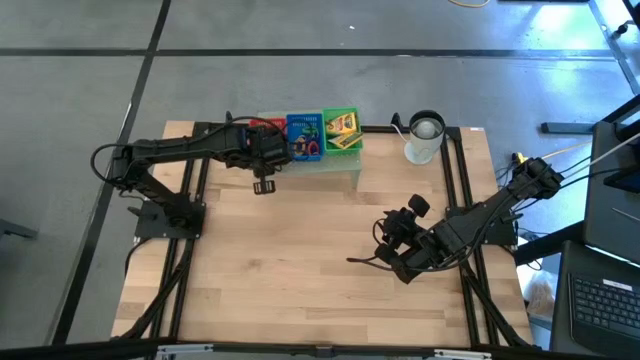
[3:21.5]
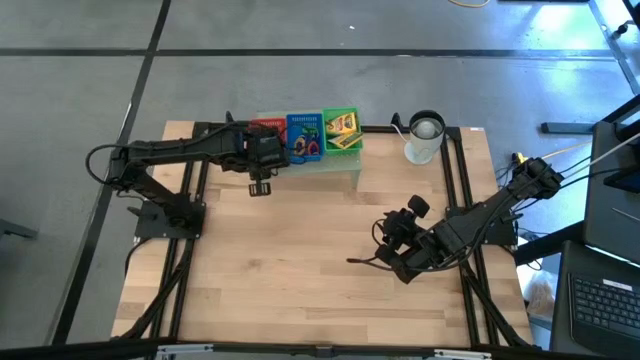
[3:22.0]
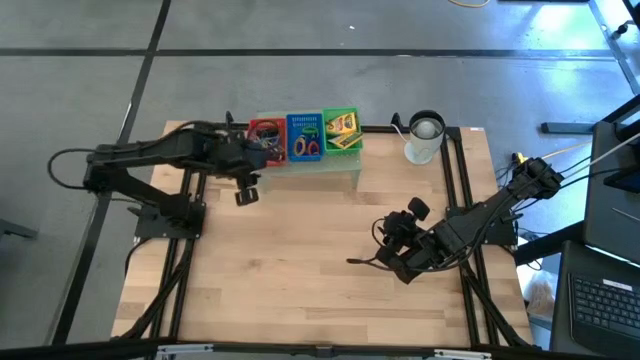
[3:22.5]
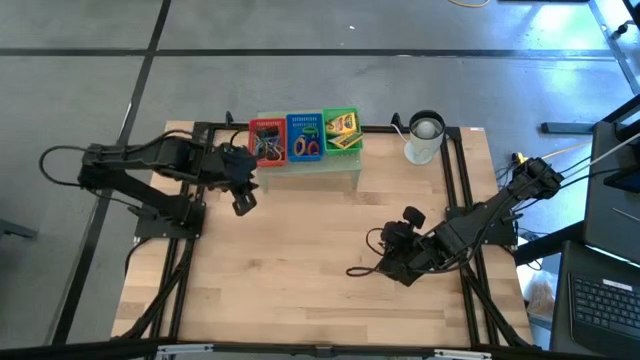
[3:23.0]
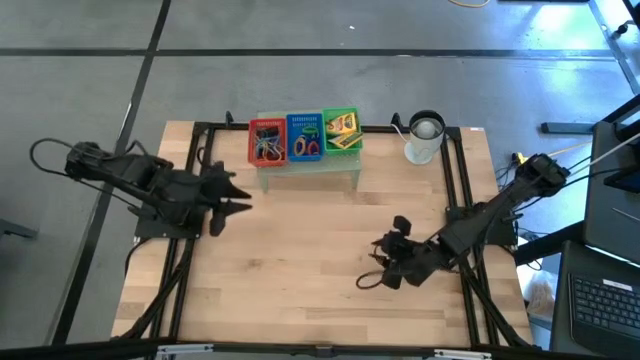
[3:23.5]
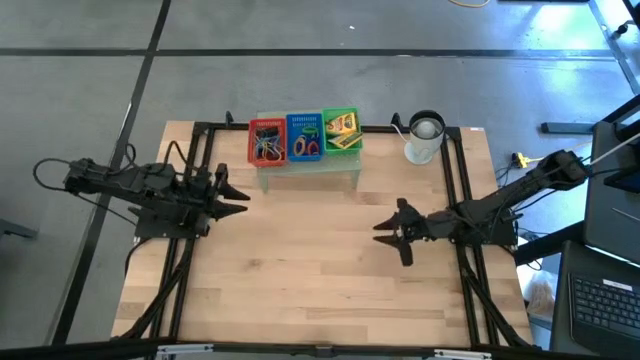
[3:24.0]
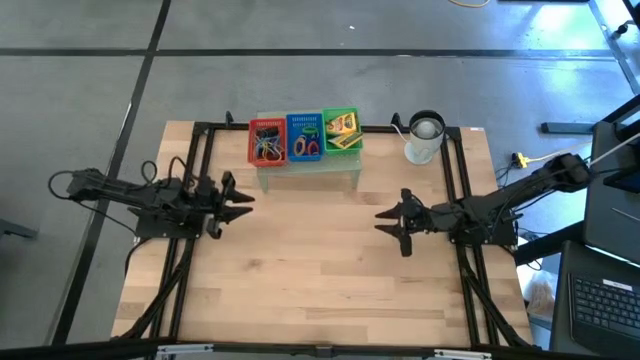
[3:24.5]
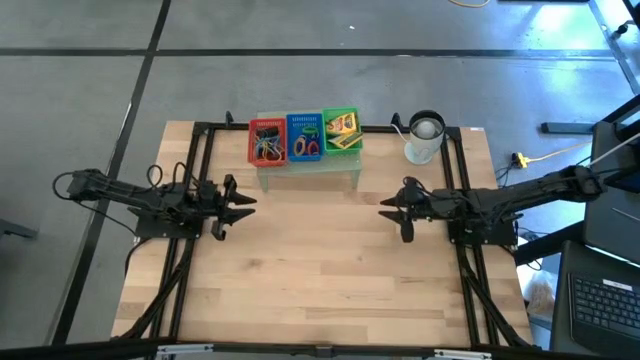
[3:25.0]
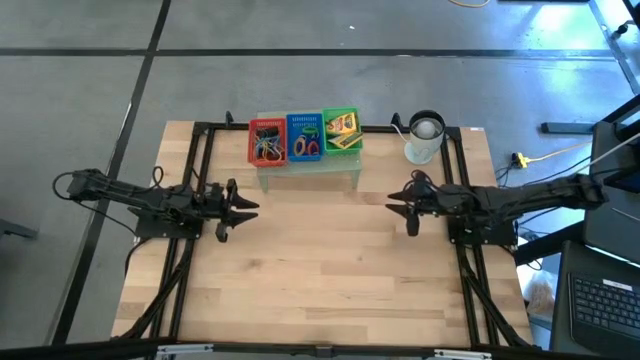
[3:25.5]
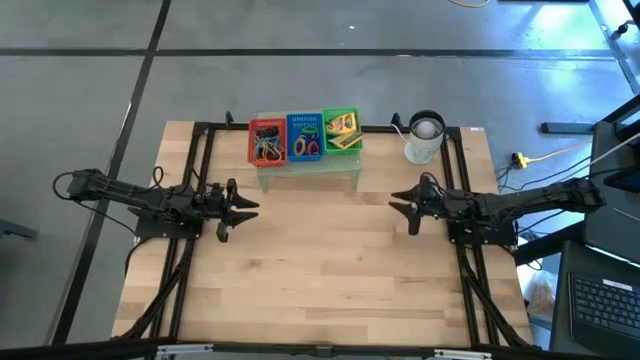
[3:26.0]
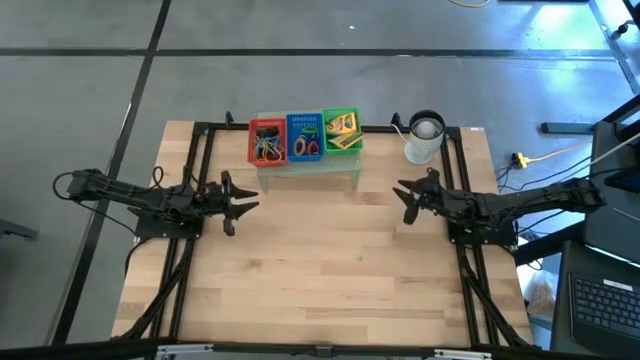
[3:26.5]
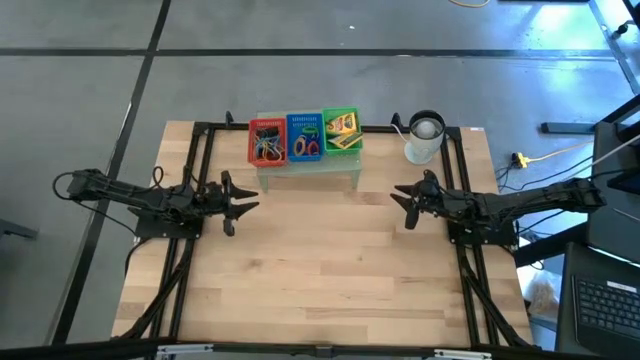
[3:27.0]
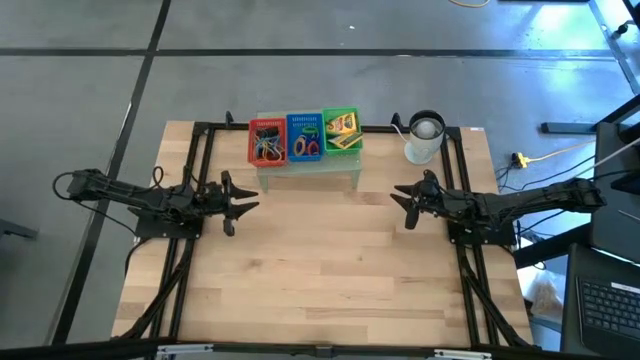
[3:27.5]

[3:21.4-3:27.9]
Task: Pick & Place Office Desk Supplies
Return to Home Position

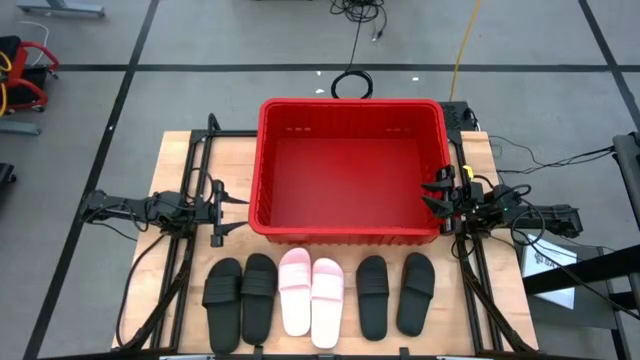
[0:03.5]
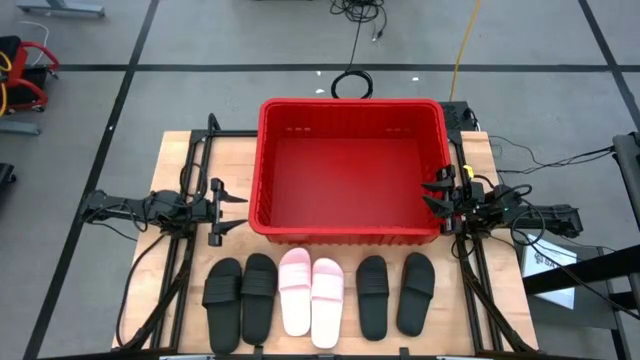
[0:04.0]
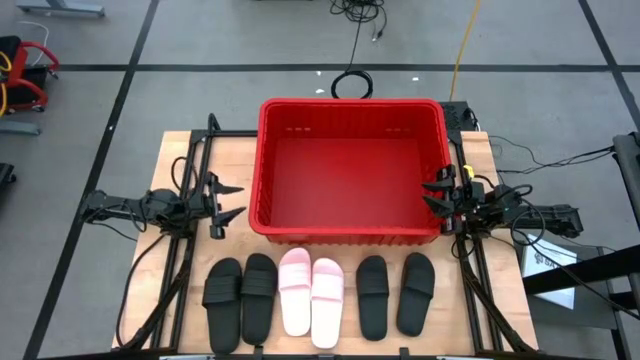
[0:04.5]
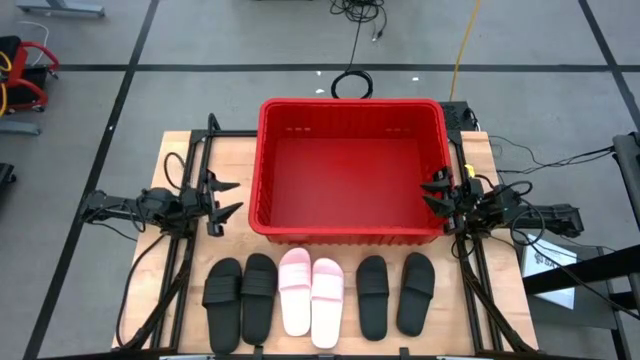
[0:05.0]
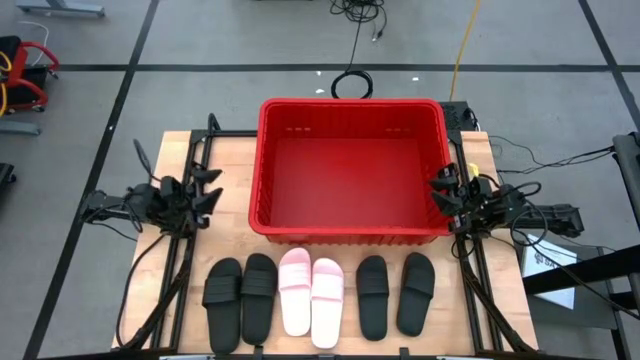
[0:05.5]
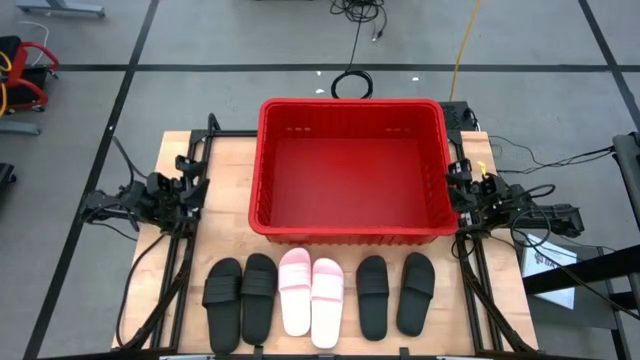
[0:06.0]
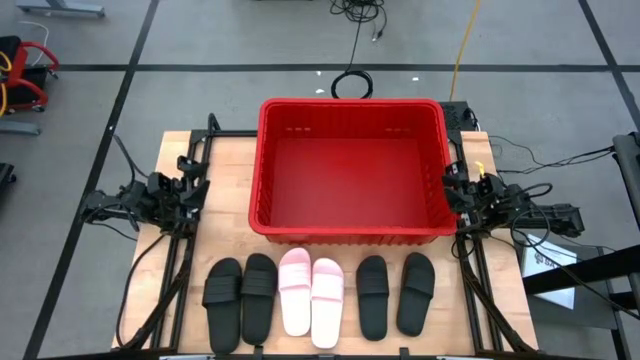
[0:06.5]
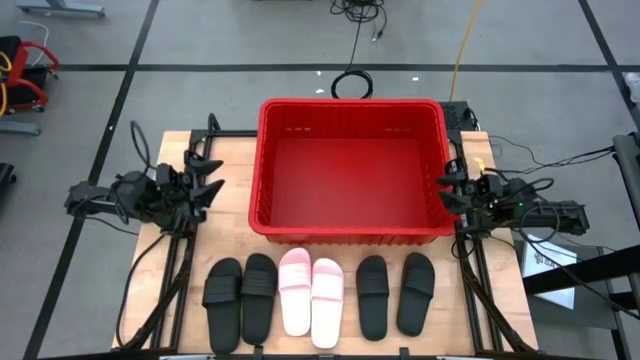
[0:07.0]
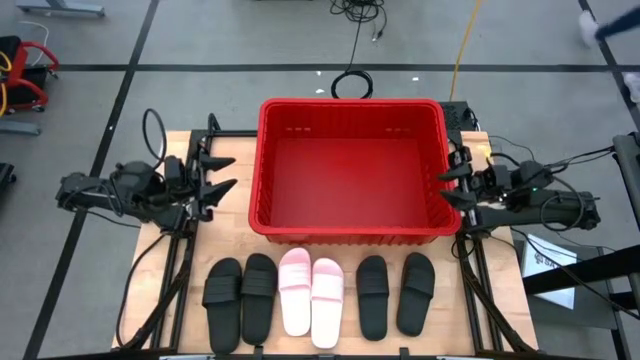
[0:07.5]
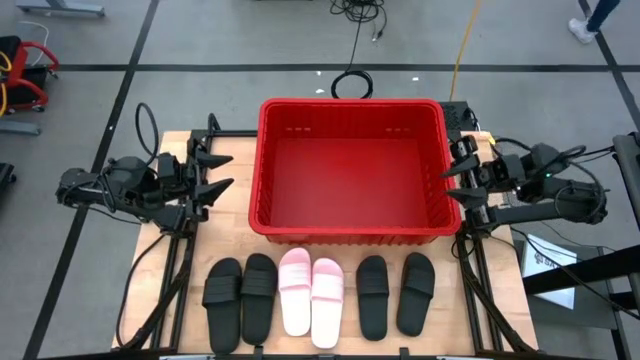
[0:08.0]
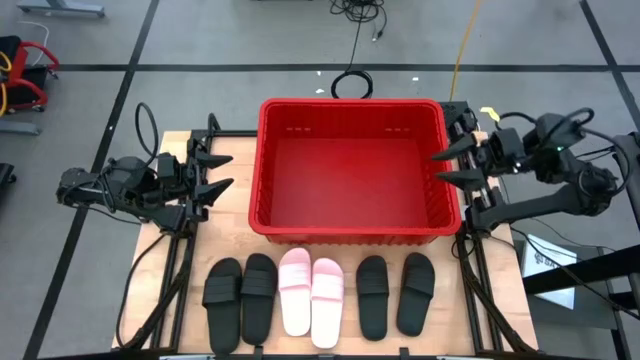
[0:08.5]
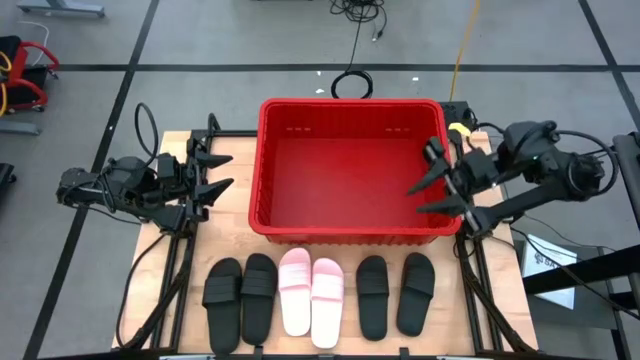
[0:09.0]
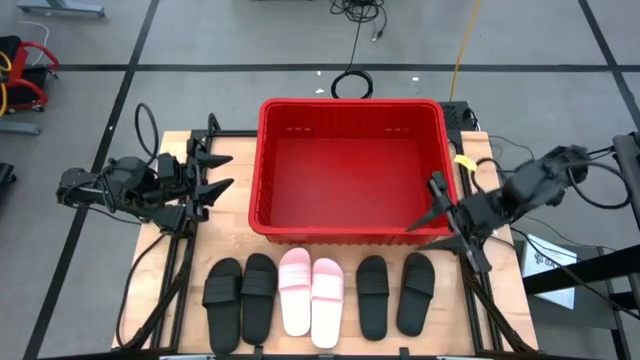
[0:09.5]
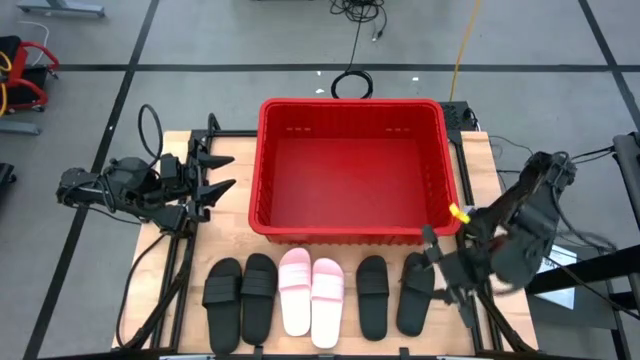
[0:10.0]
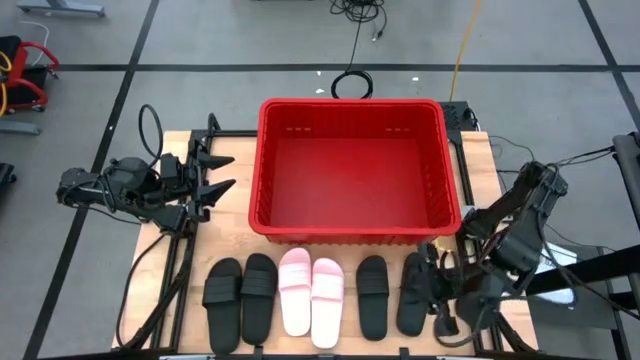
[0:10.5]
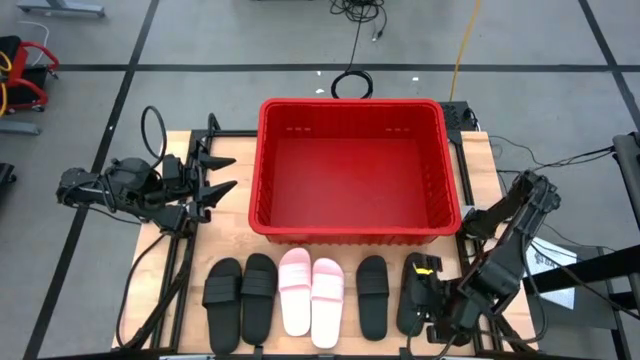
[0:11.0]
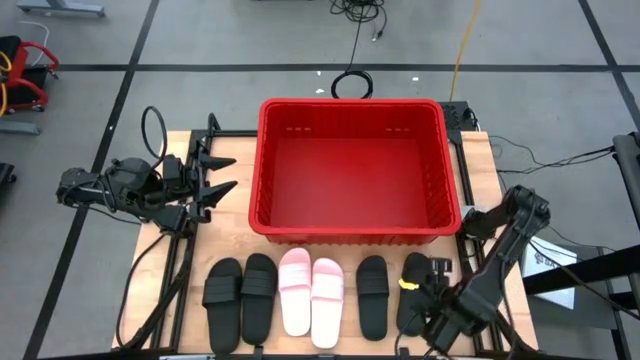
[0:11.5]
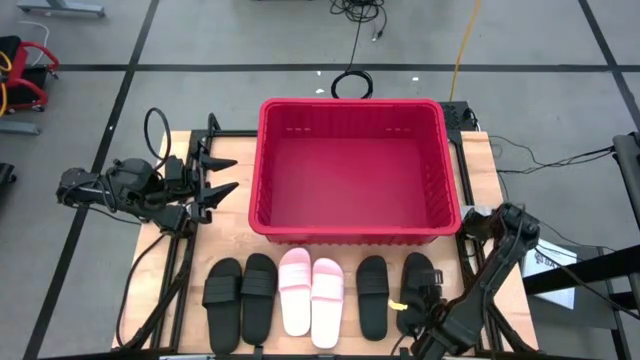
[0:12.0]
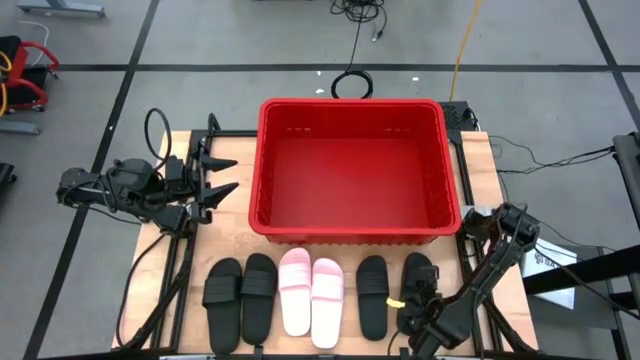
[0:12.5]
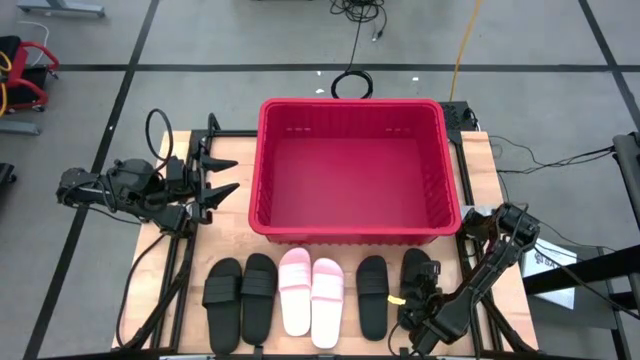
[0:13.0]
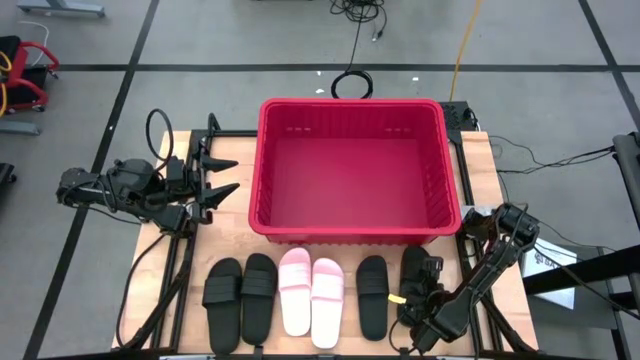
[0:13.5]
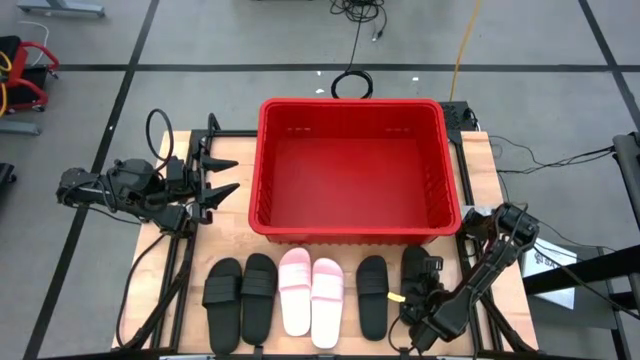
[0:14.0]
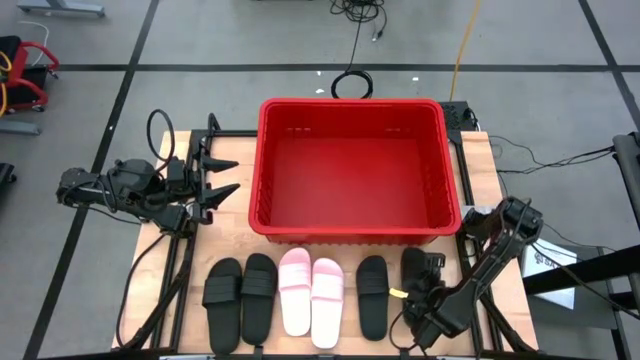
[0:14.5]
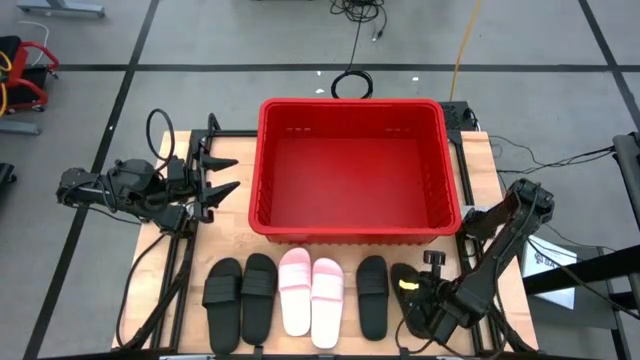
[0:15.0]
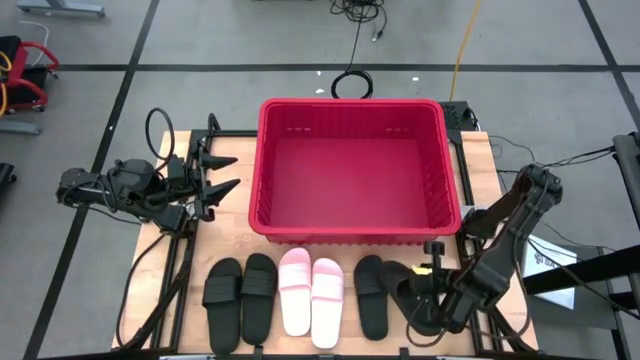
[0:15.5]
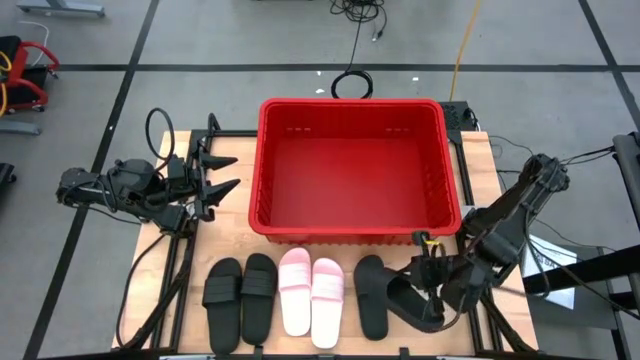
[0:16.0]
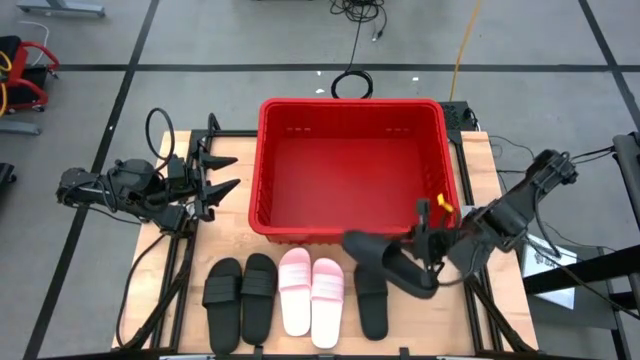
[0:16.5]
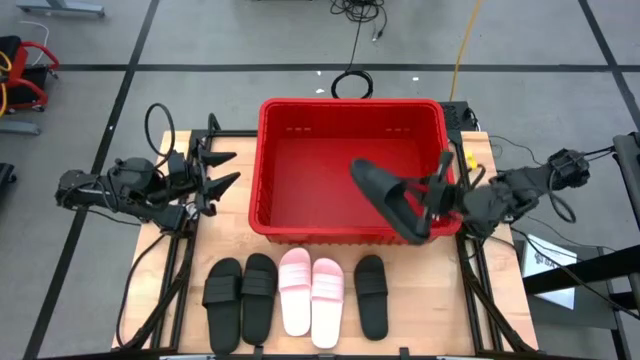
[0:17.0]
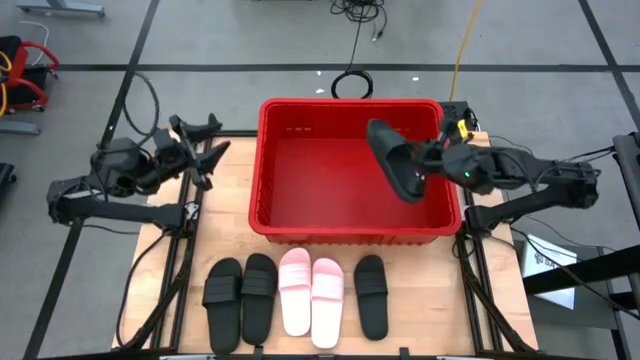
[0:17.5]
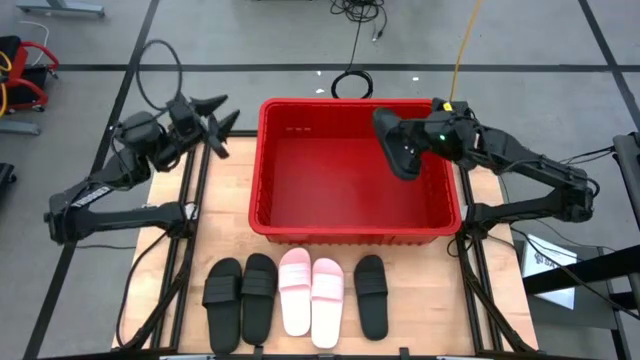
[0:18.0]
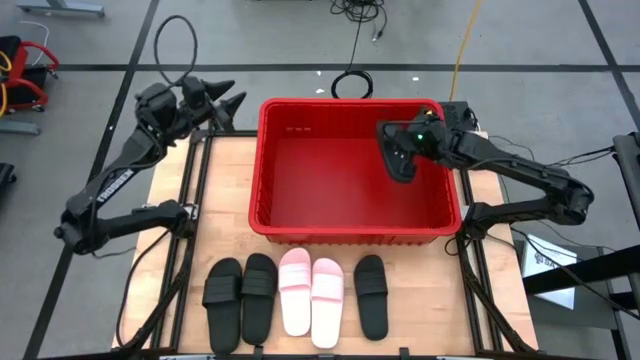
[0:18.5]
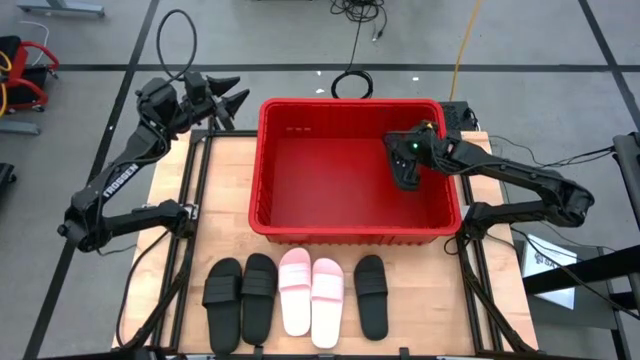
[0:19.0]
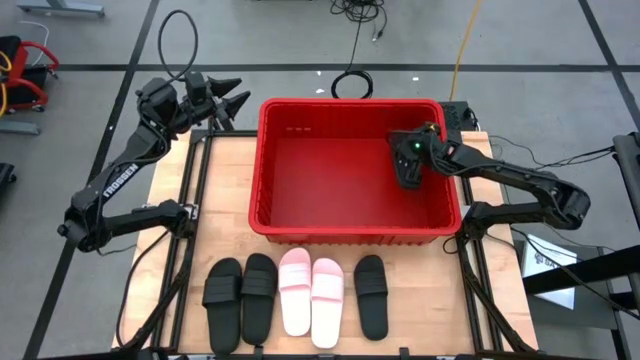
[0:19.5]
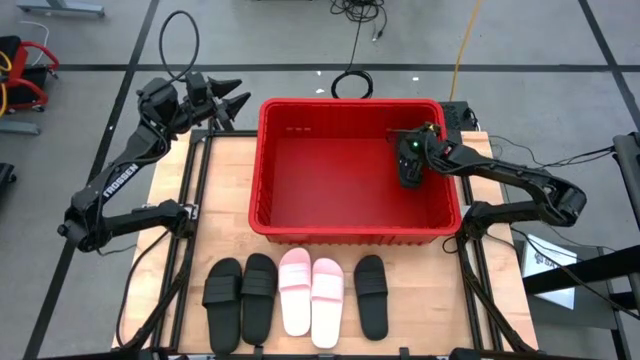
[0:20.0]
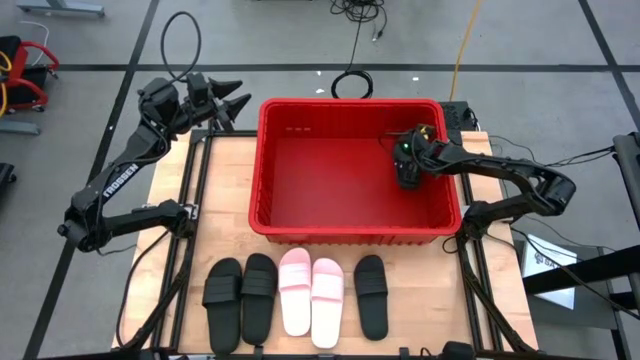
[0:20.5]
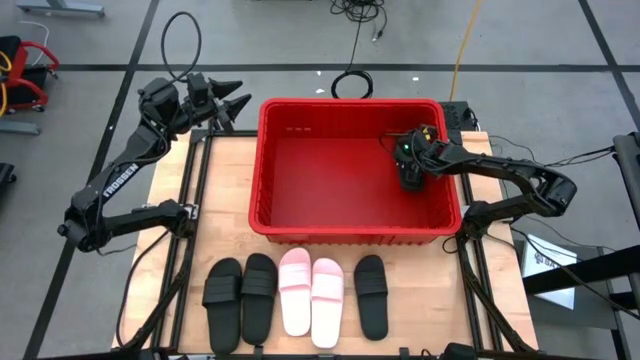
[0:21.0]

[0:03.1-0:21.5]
Task: Pick and place slides into bin
Put the black slide into the red bin
